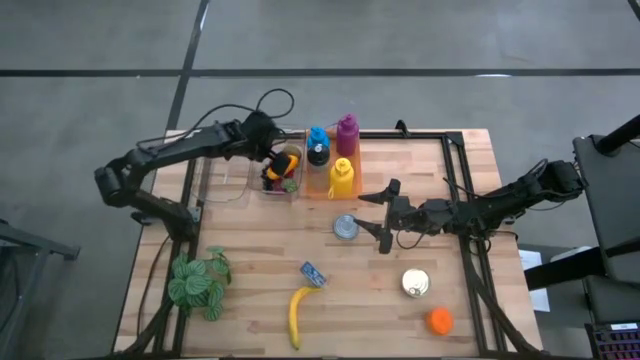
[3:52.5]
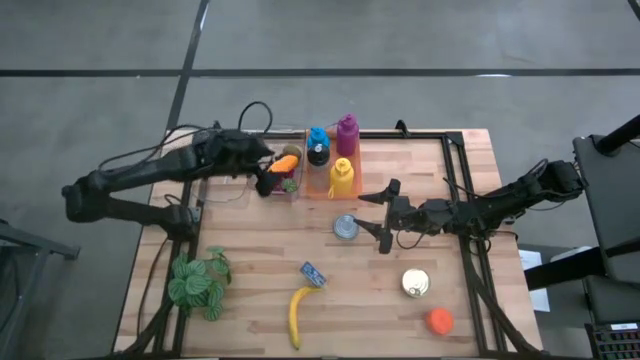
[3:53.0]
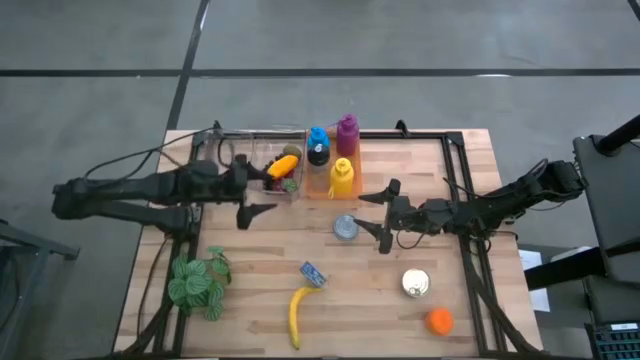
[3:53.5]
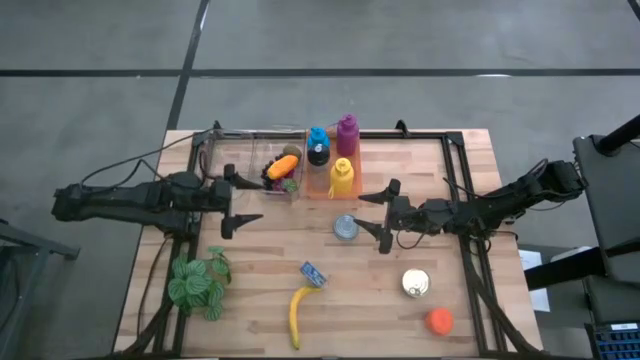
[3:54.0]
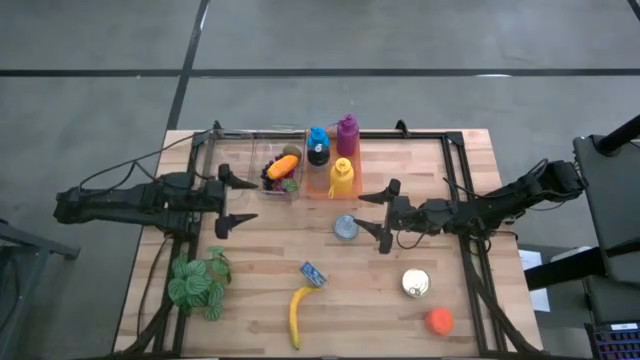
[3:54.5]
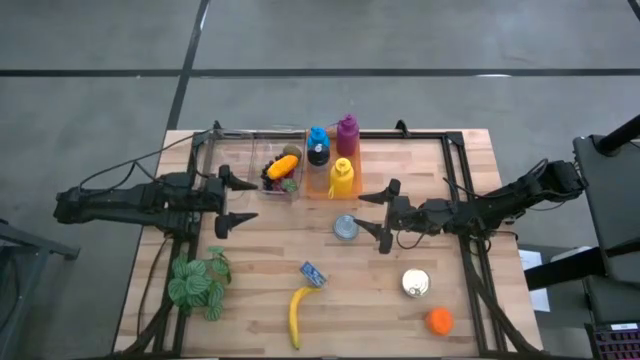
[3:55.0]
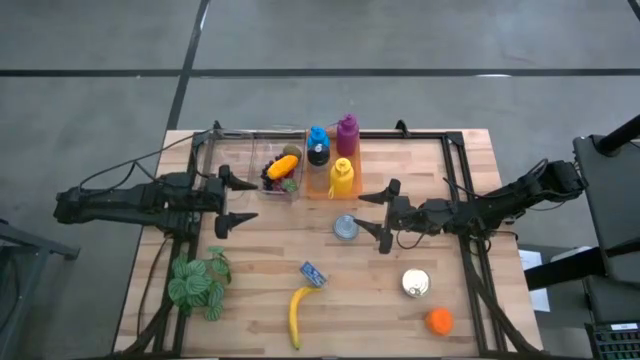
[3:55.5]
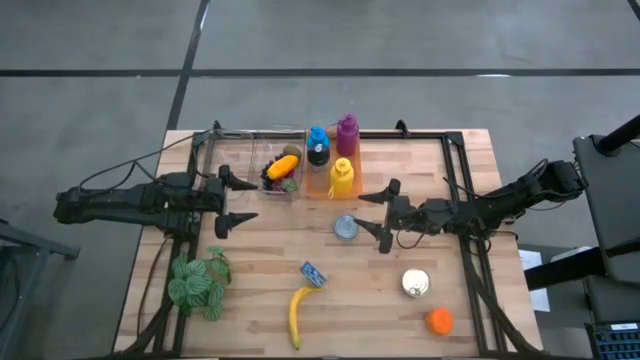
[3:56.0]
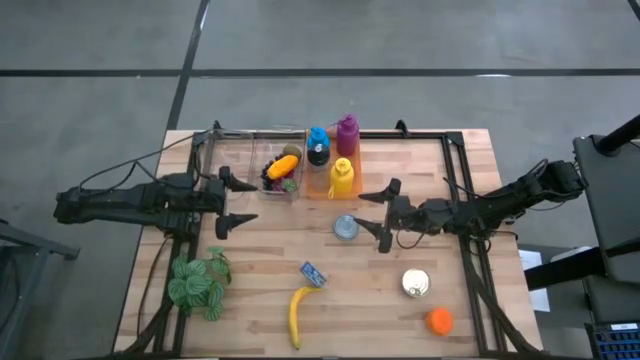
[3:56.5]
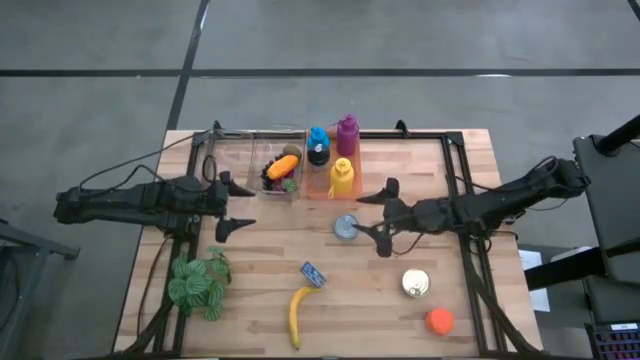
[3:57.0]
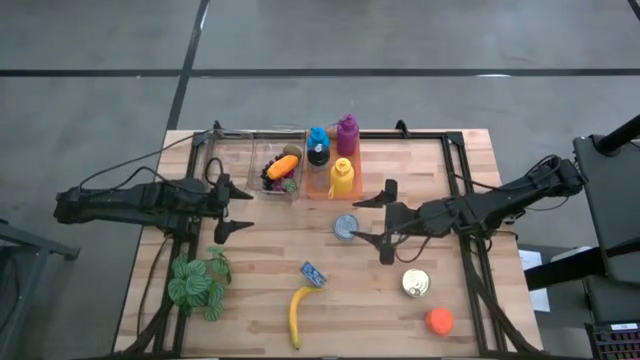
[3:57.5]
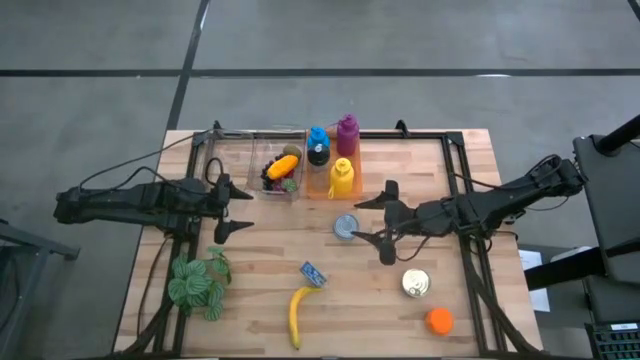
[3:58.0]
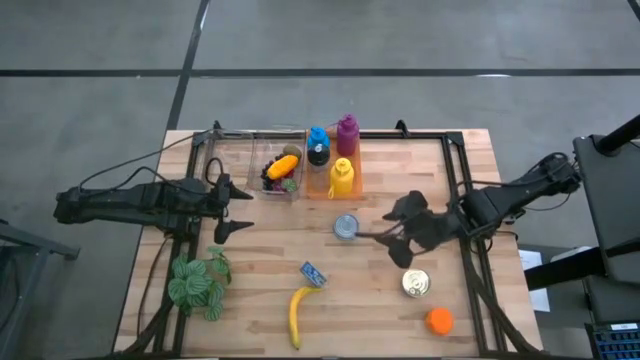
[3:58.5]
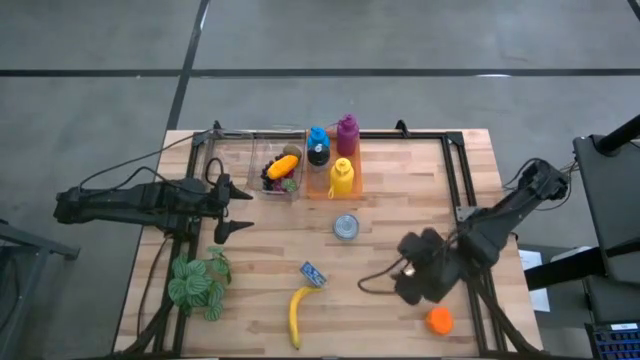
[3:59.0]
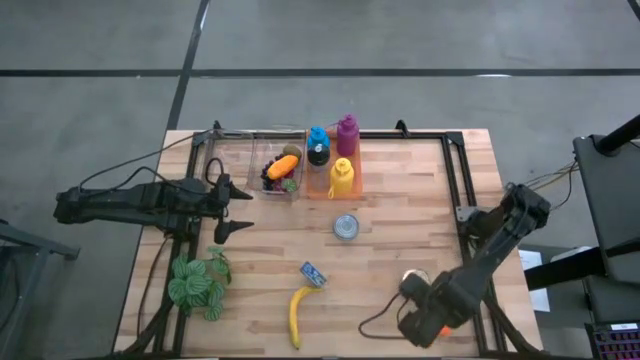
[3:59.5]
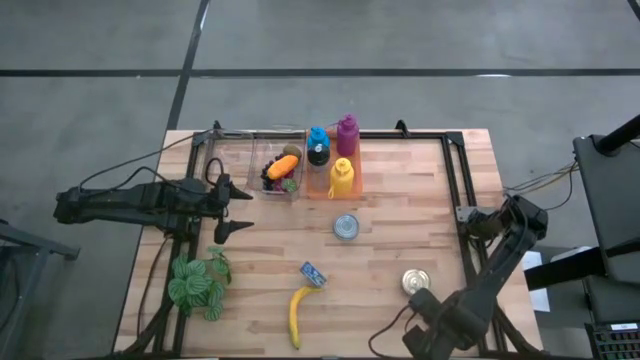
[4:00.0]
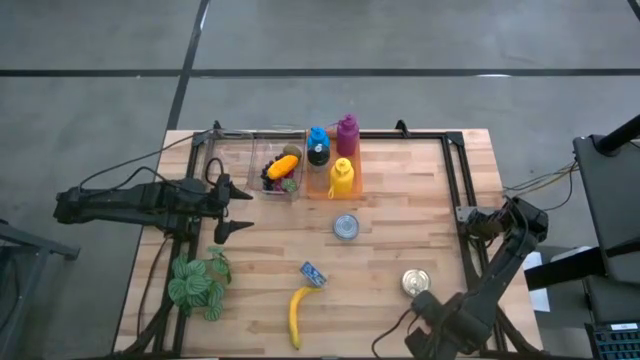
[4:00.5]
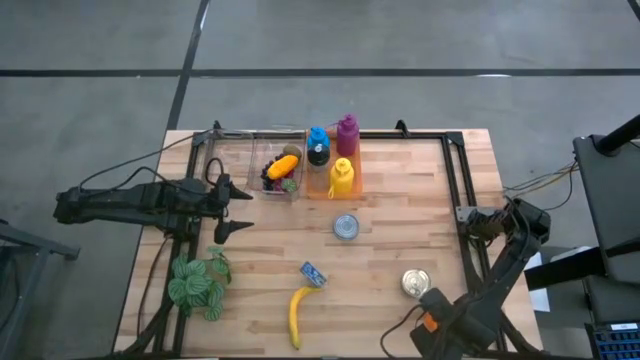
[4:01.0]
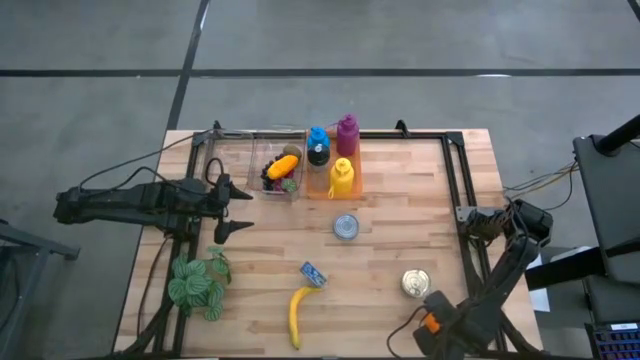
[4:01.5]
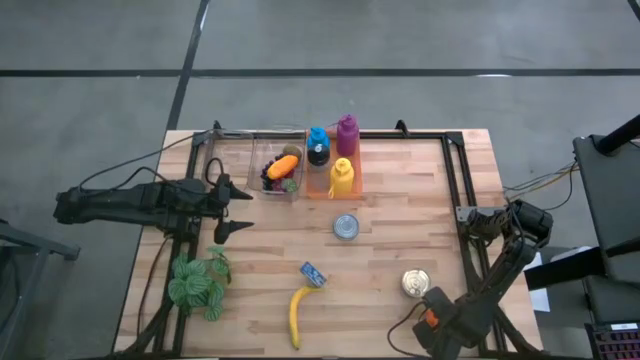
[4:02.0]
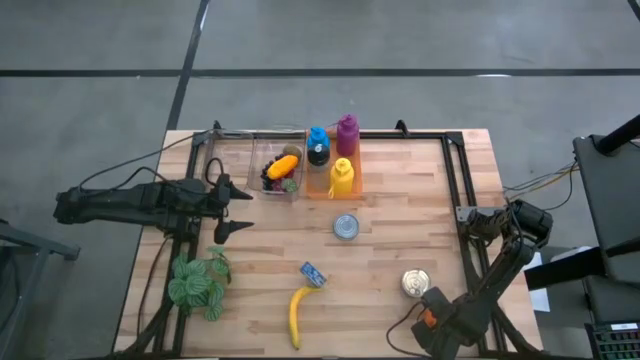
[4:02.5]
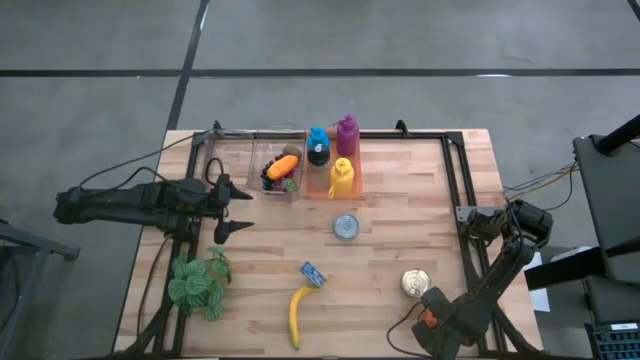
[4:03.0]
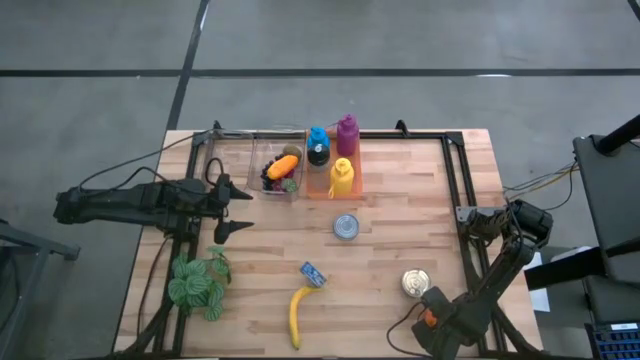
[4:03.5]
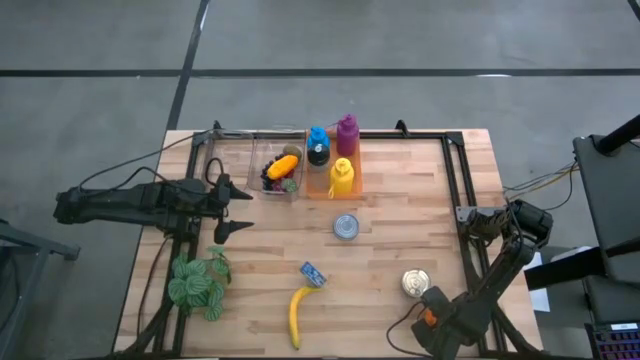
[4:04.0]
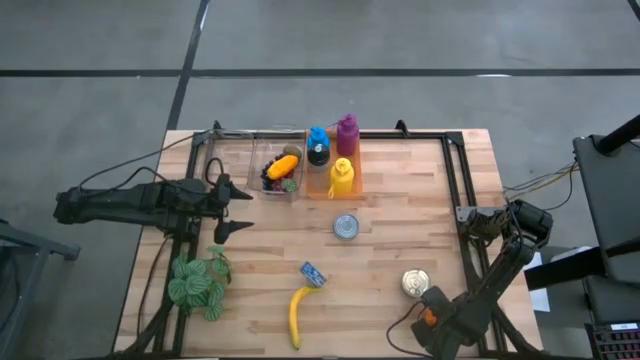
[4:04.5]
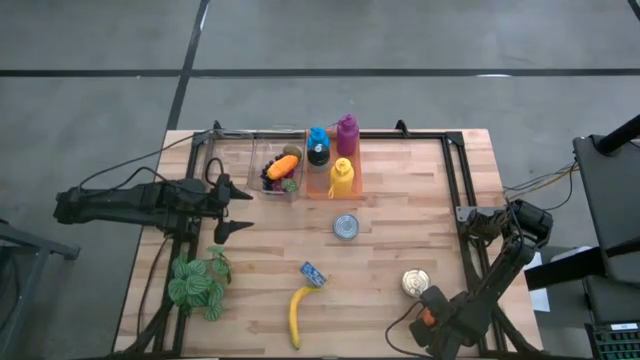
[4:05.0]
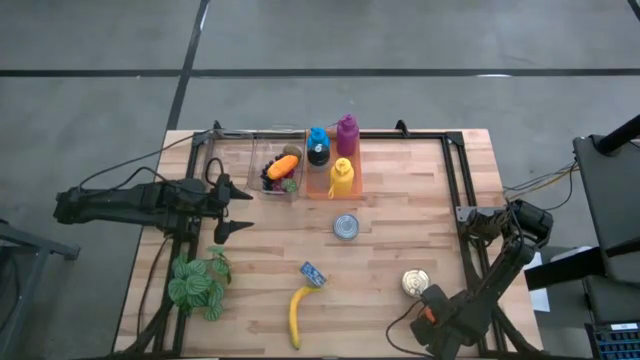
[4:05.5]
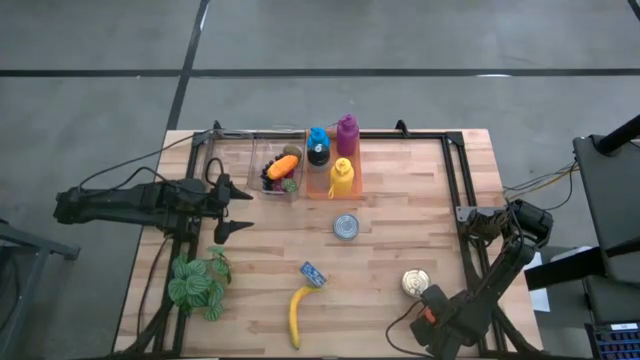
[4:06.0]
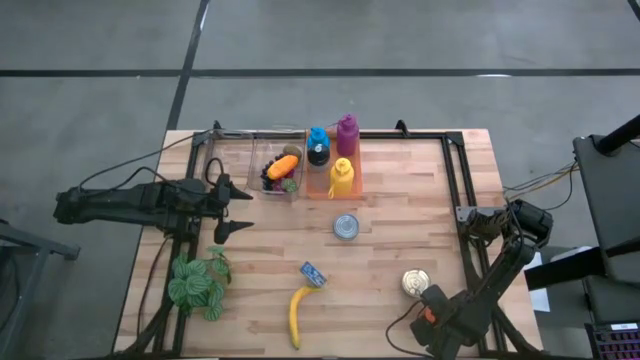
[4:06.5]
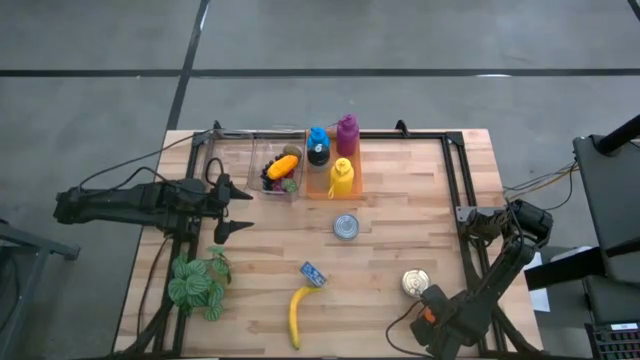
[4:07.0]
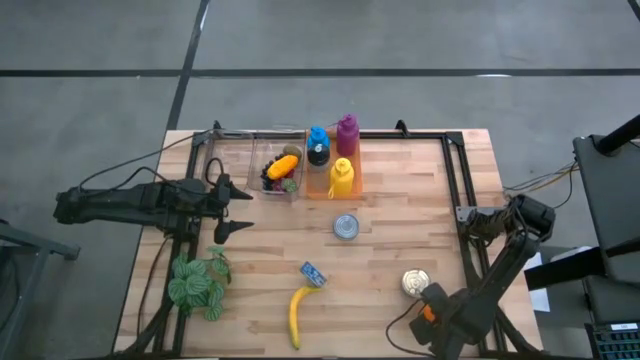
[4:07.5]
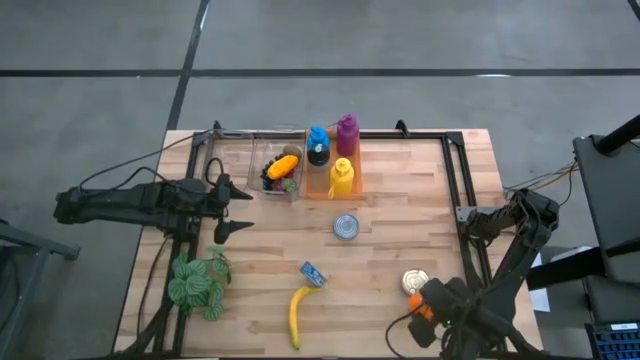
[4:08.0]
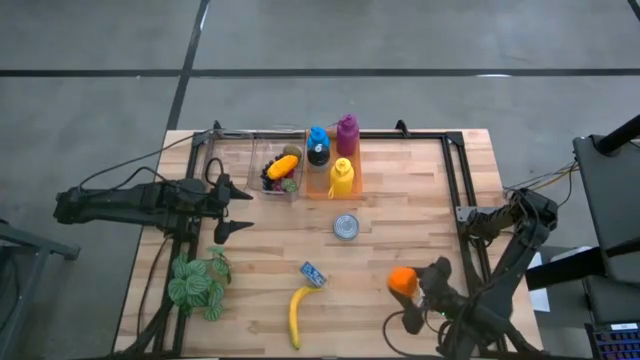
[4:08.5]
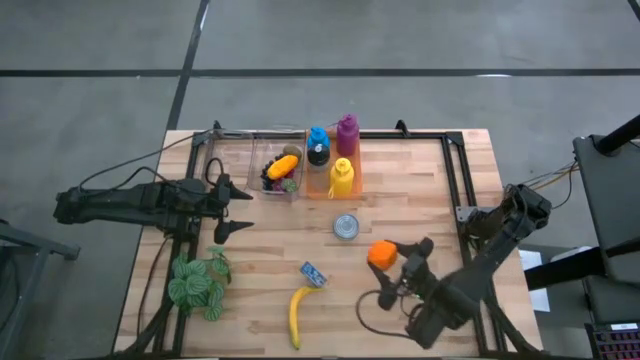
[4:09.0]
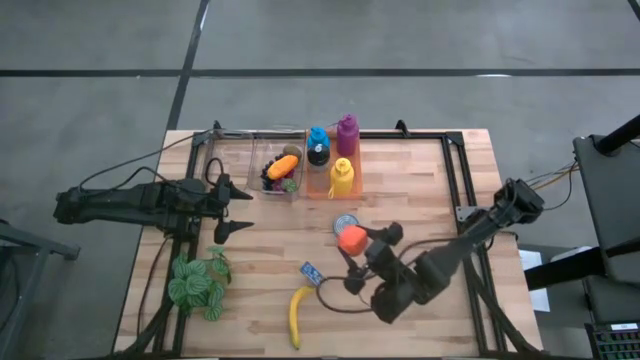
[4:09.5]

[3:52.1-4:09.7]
Task: Pick & Place Food Item
Put the orange into the right transparent bin
